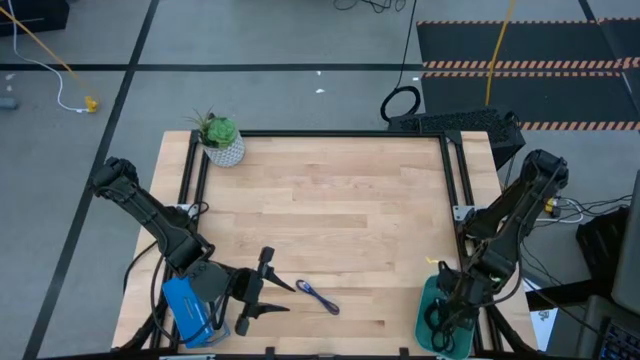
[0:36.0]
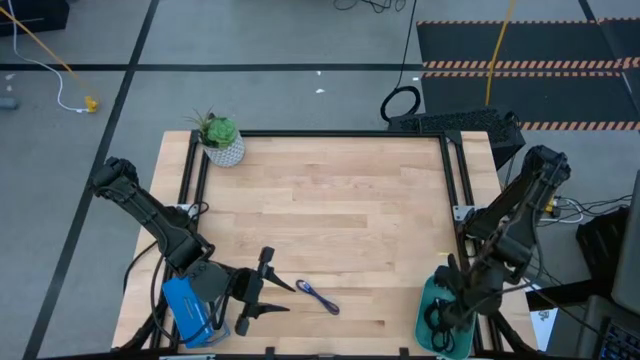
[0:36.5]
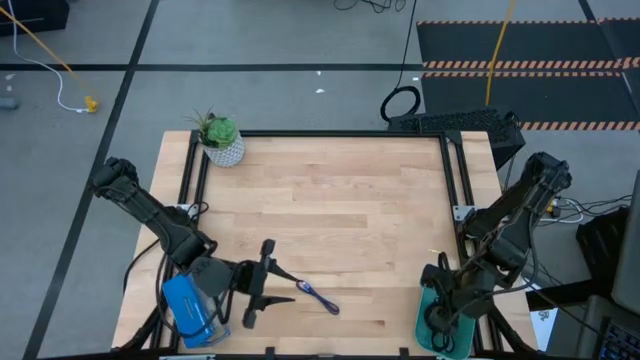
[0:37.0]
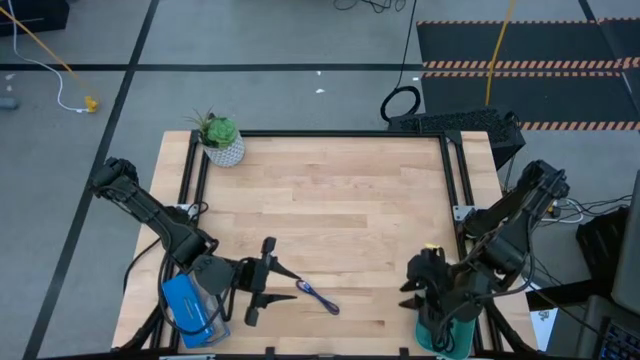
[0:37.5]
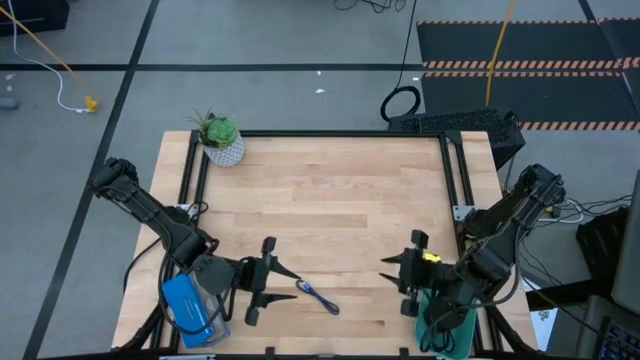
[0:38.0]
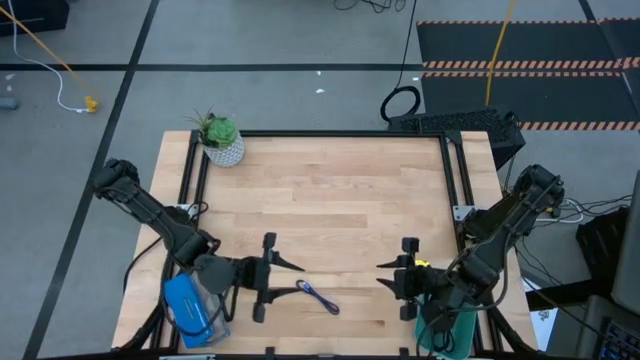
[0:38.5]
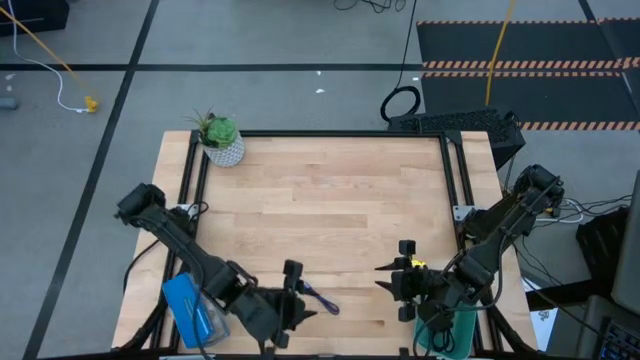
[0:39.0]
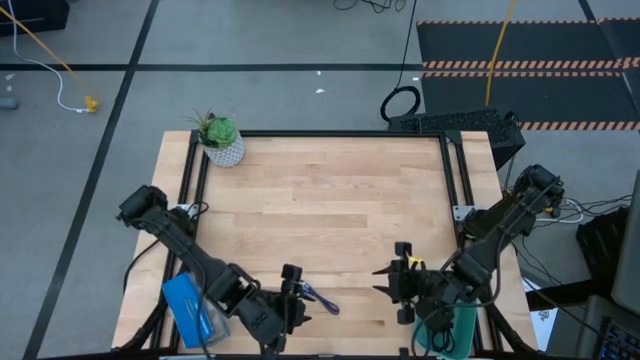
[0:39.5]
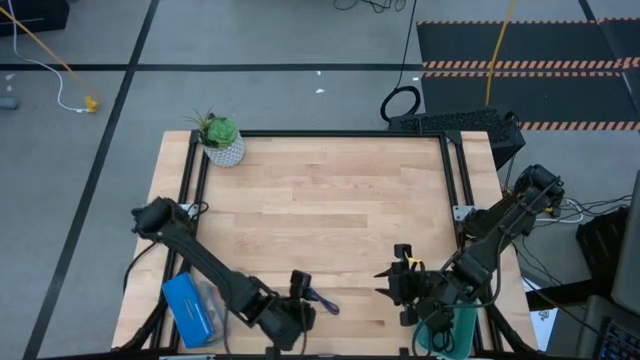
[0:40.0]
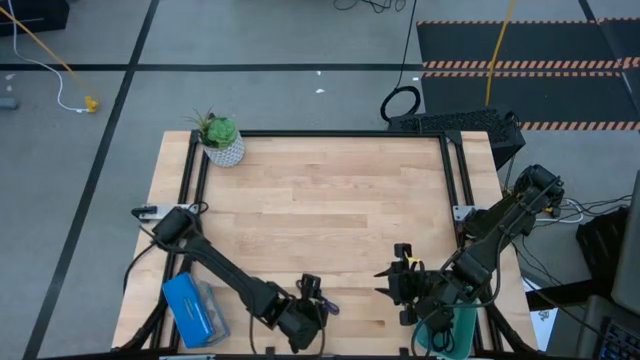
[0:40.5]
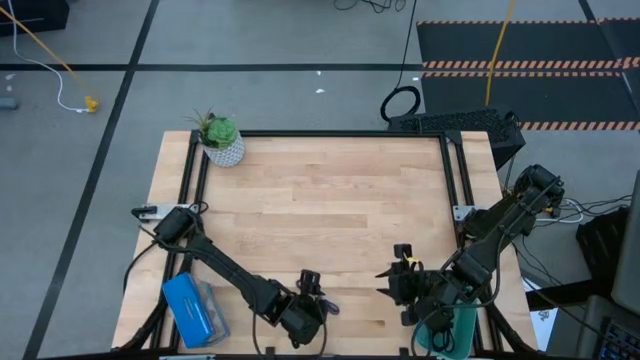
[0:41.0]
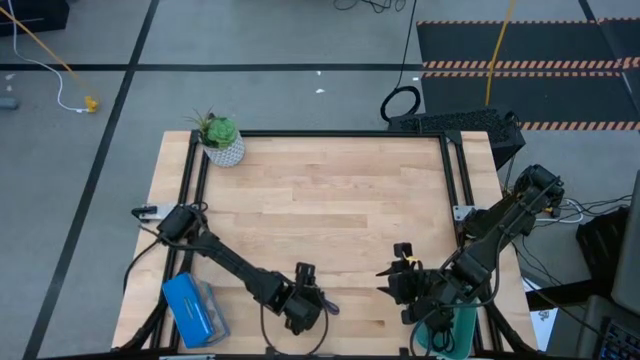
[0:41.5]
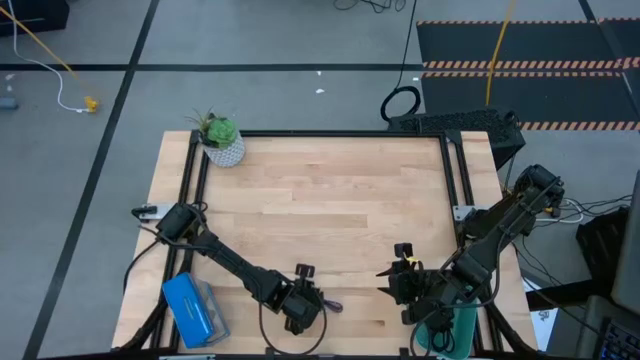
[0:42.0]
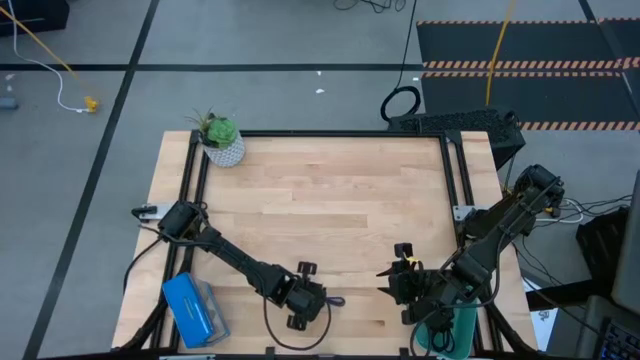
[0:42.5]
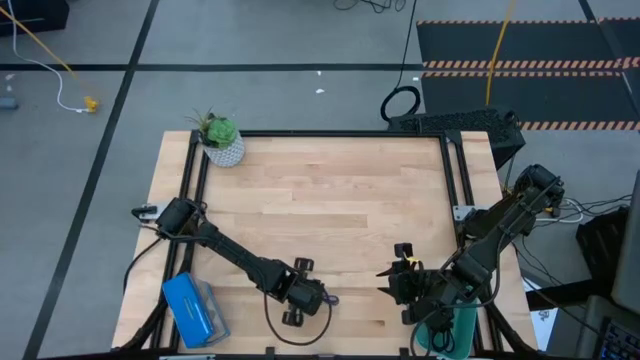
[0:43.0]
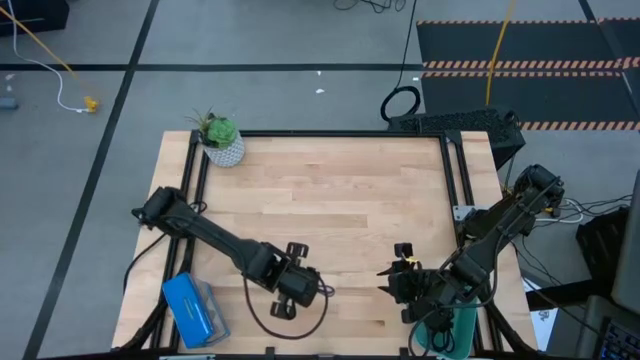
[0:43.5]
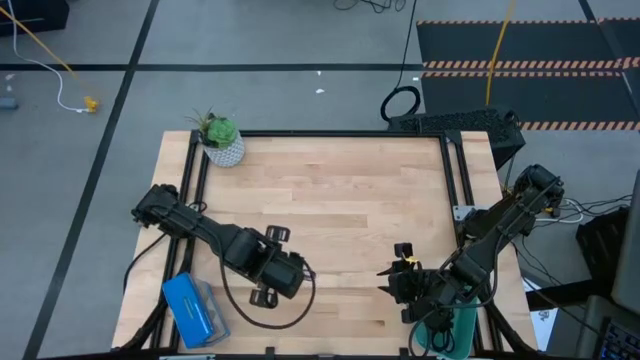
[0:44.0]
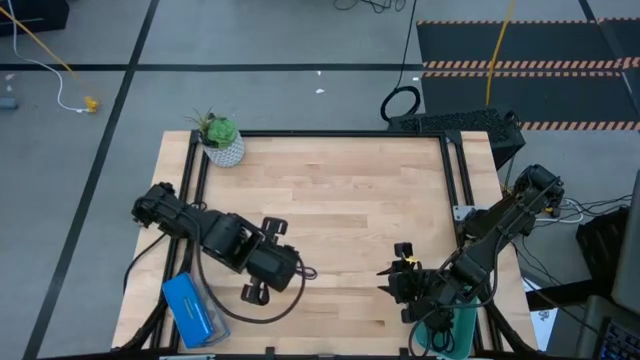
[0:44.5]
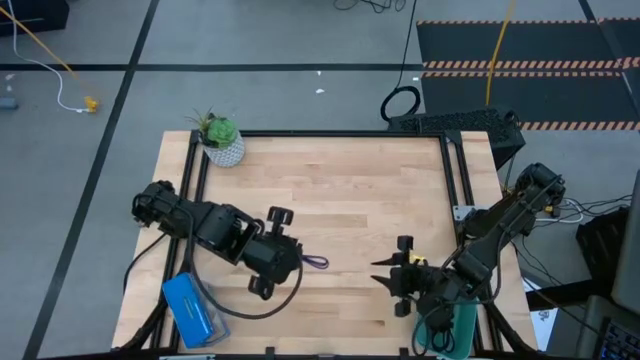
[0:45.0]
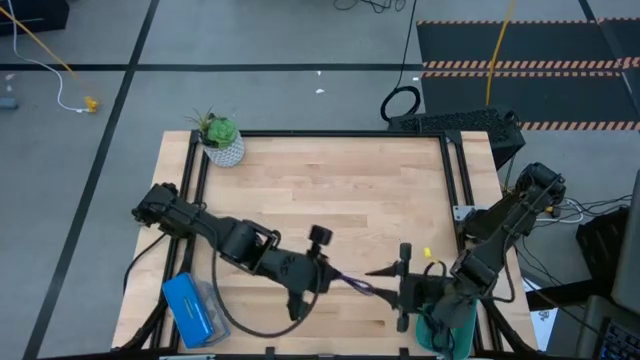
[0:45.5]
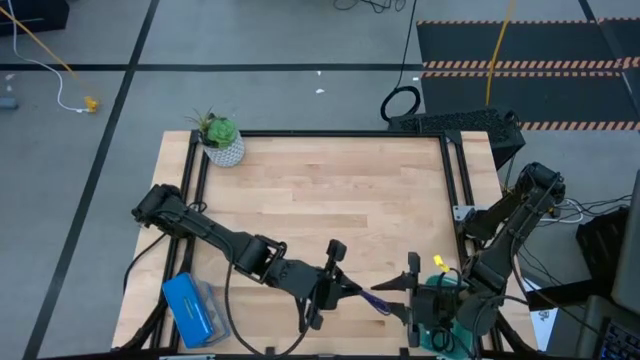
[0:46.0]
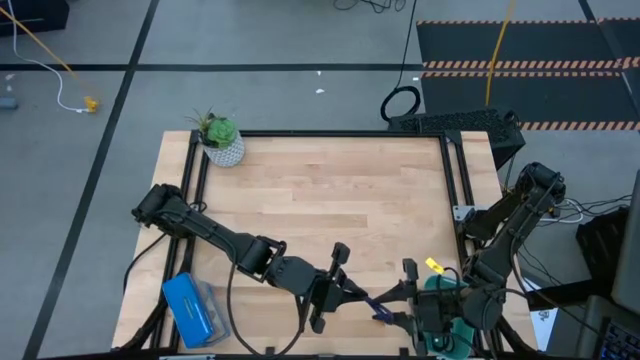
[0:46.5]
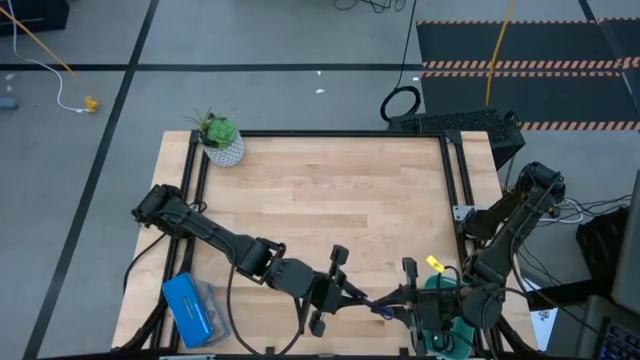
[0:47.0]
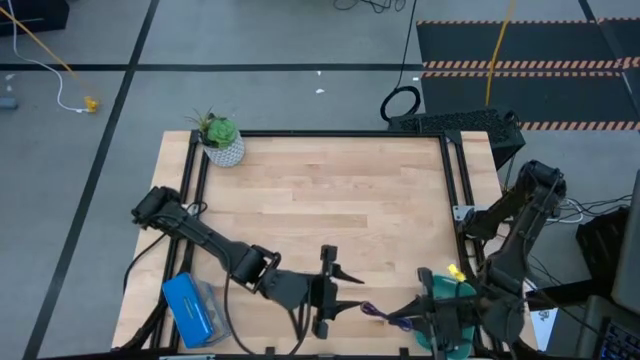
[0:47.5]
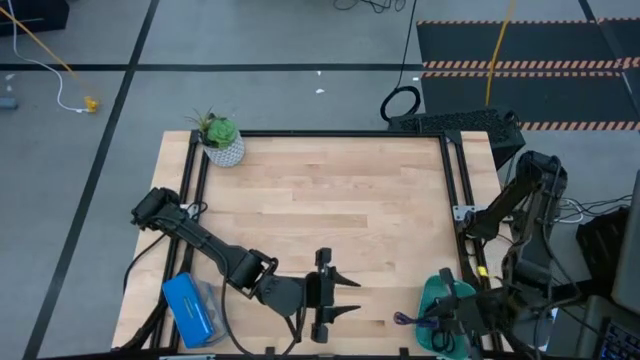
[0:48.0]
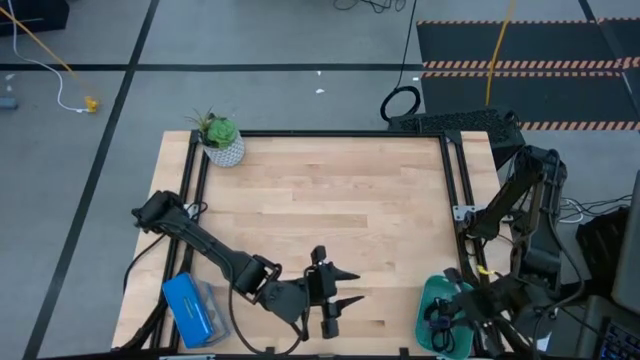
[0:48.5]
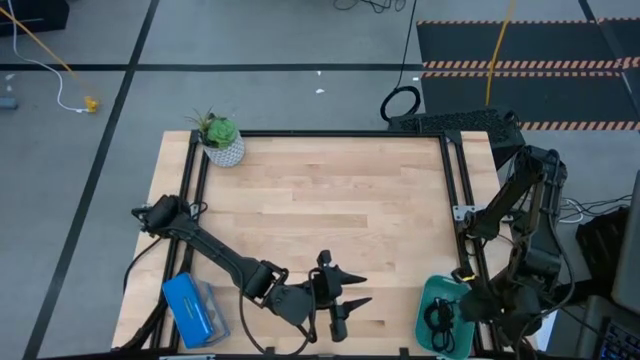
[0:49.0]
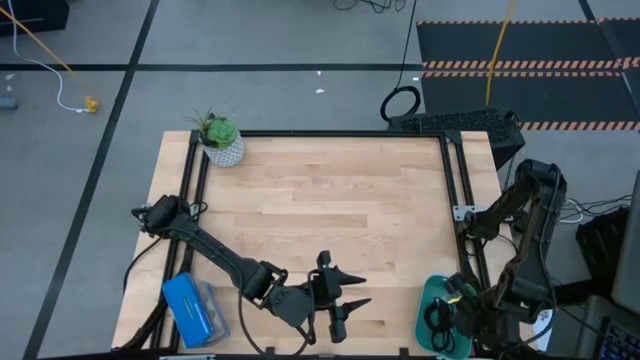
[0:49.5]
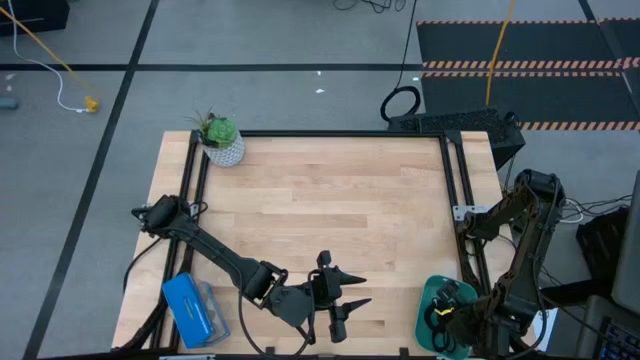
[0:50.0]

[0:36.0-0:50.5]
Task: Pick and place USB-C Cables
Put the purple USB cable into the green bin

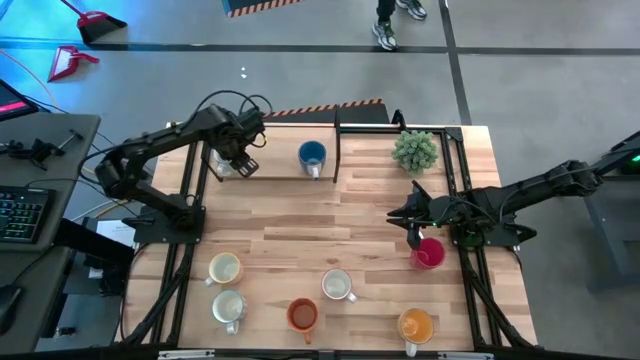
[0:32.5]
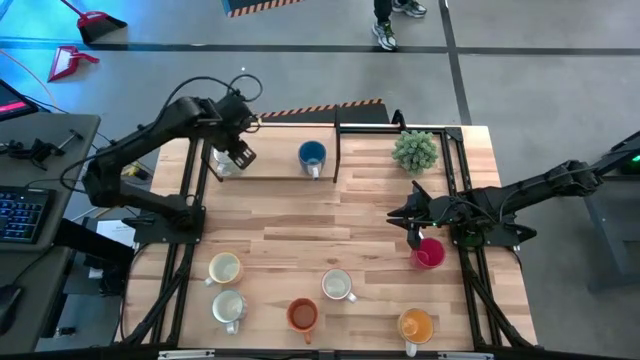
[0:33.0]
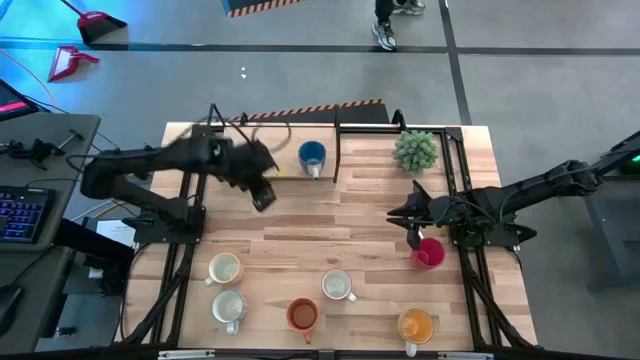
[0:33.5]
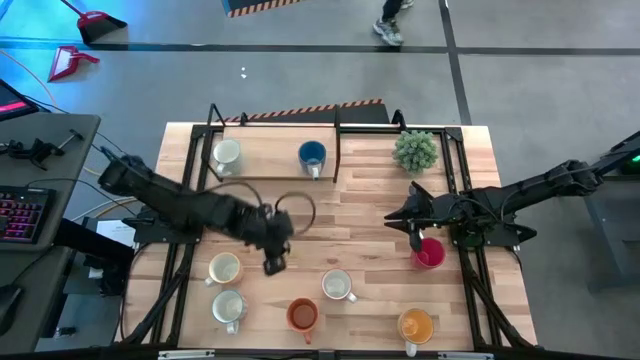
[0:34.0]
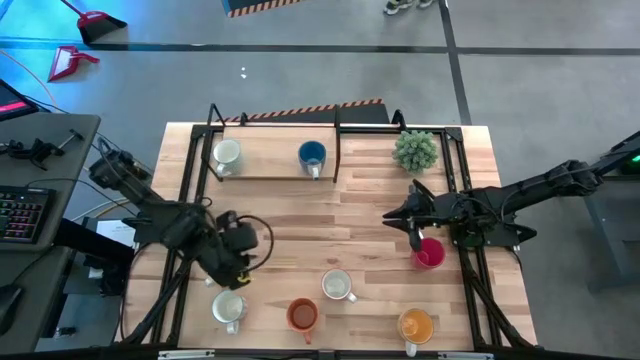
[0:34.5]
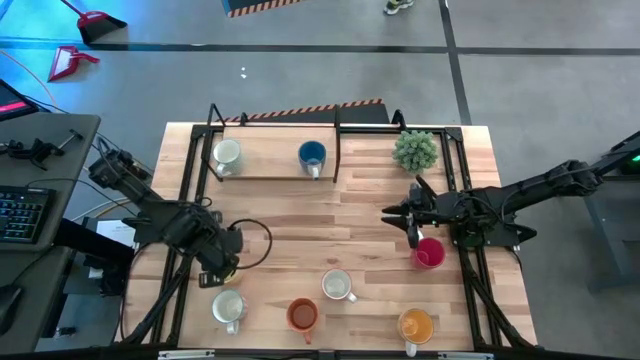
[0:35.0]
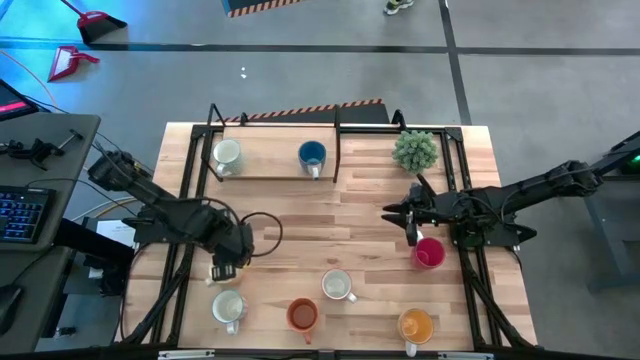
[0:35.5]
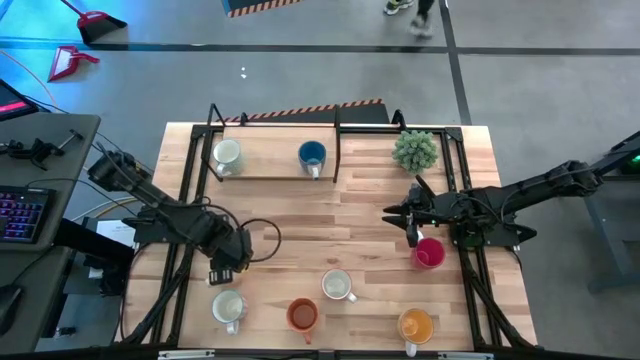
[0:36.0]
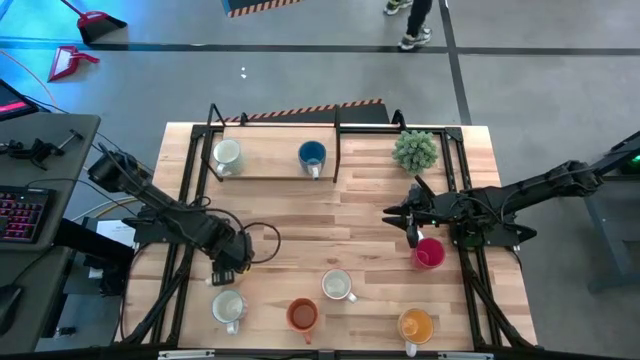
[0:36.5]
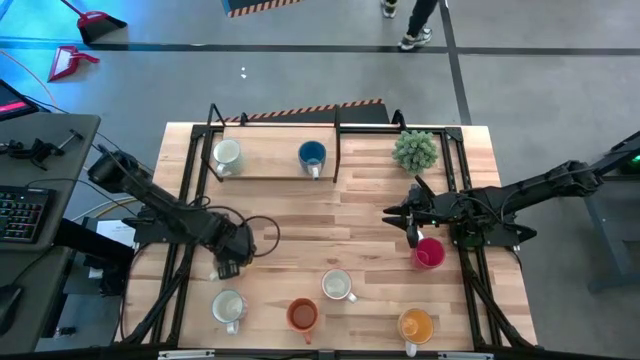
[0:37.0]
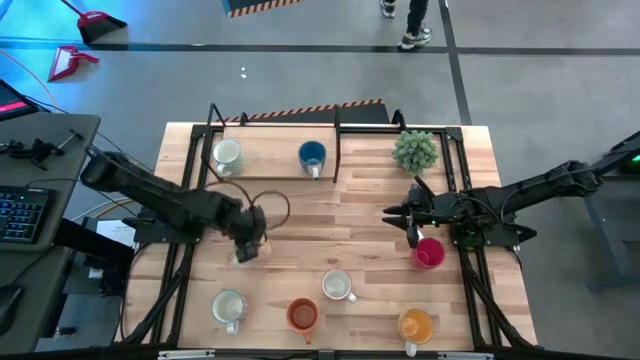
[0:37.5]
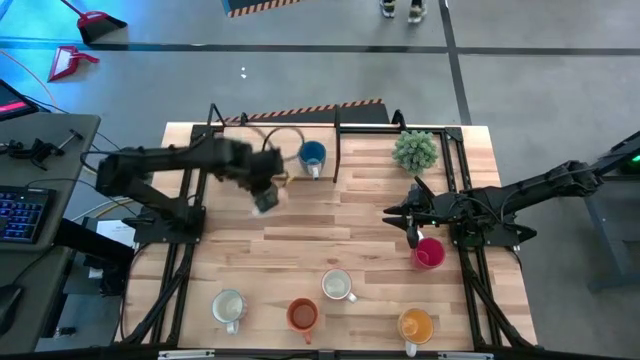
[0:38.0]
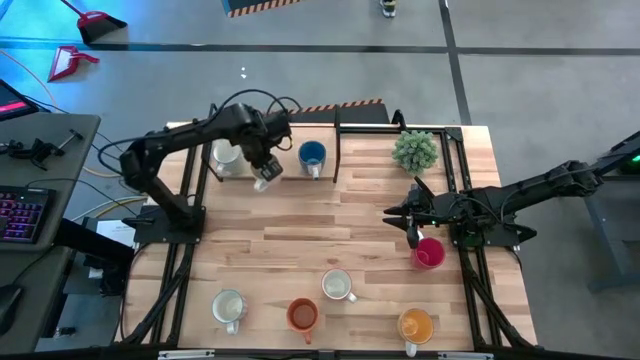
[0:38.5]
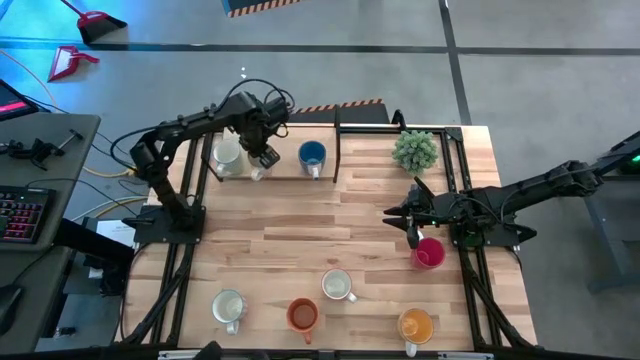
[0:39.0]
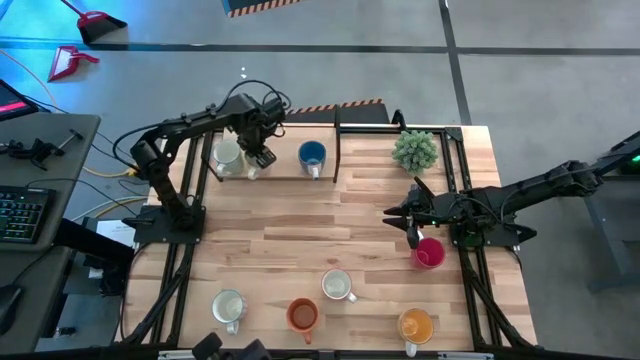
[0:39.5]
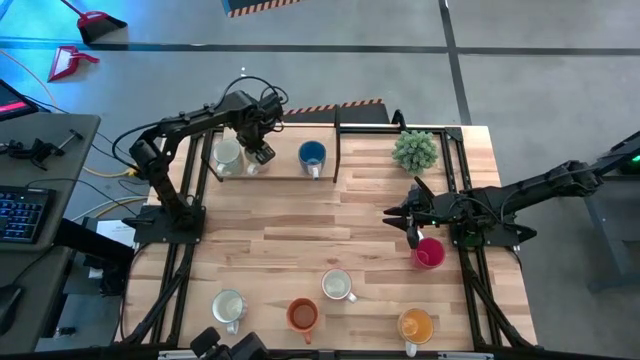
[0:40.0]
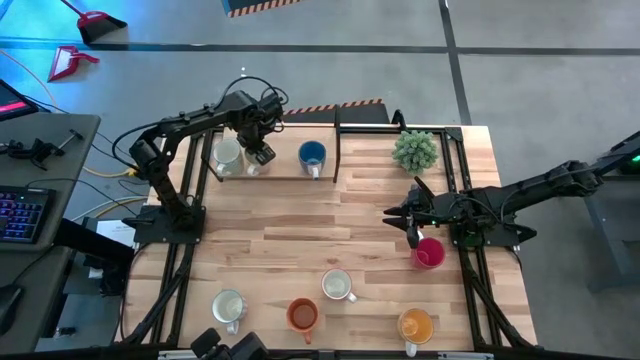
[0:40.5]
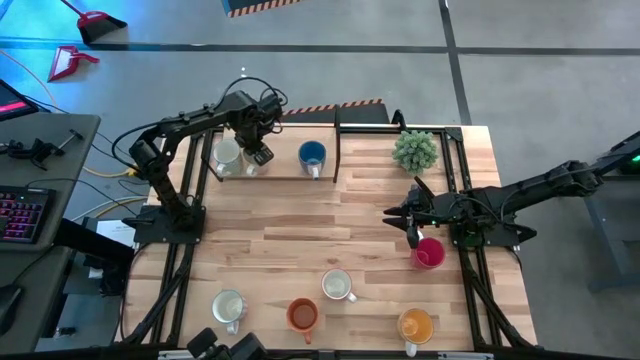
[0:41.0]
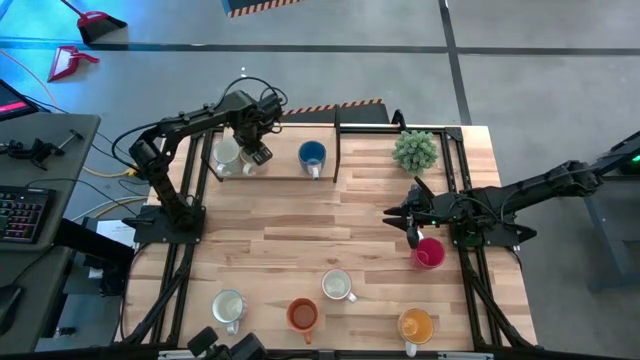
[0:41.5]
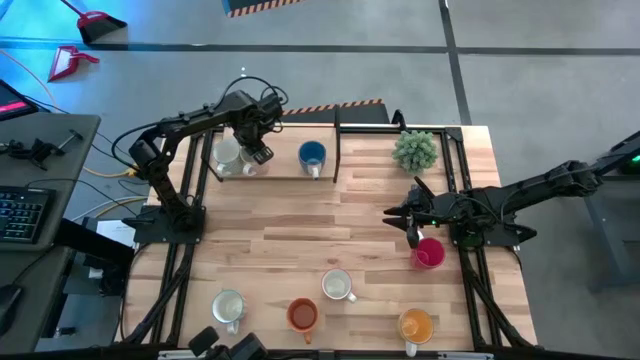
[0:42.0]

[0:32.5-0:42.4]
Task: Place coffee mugs
Put the orange patterned mug on the shelf
